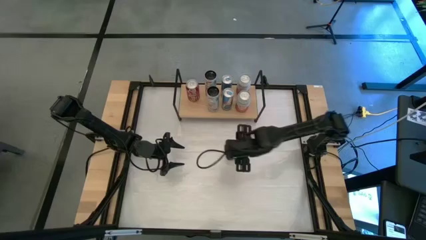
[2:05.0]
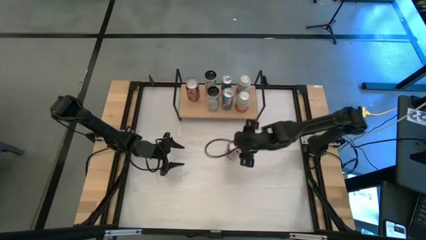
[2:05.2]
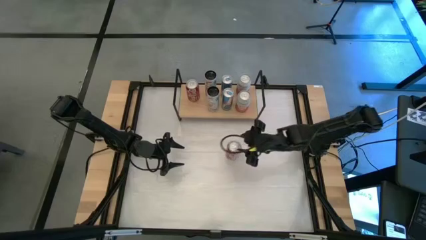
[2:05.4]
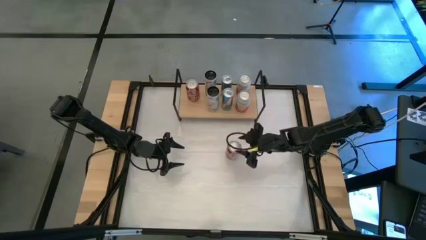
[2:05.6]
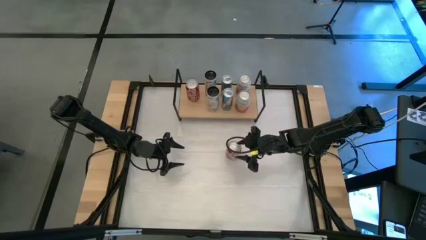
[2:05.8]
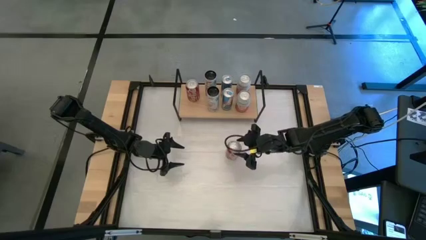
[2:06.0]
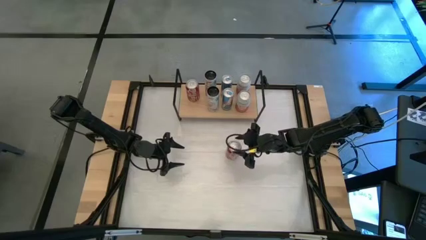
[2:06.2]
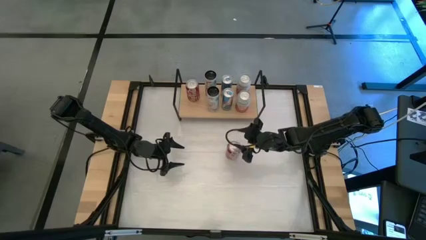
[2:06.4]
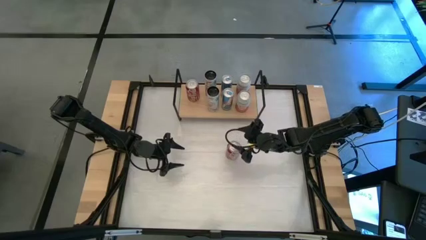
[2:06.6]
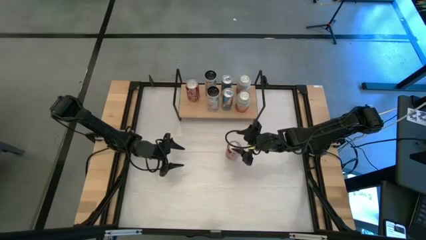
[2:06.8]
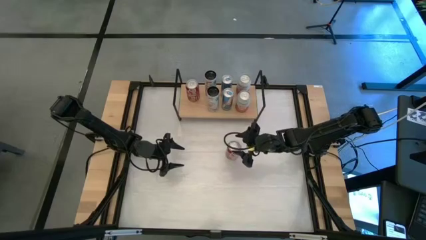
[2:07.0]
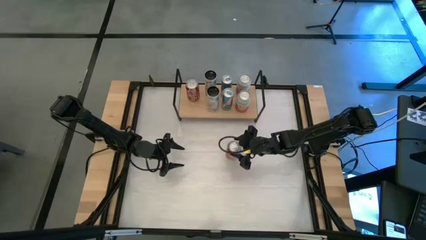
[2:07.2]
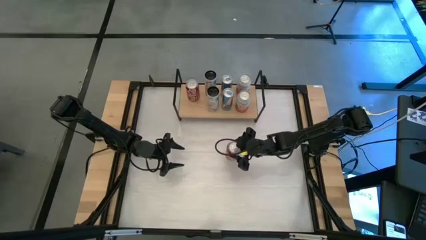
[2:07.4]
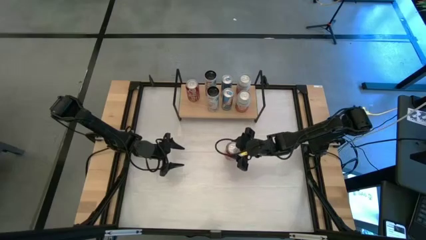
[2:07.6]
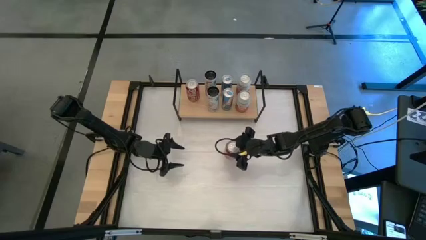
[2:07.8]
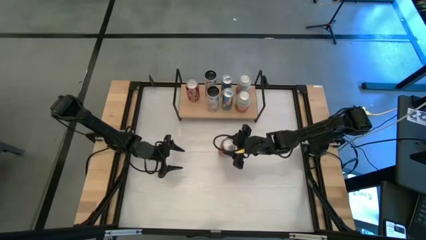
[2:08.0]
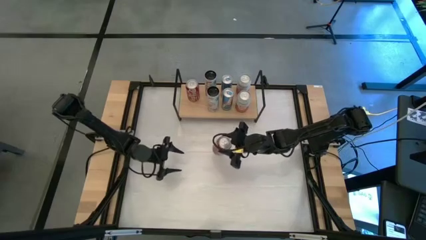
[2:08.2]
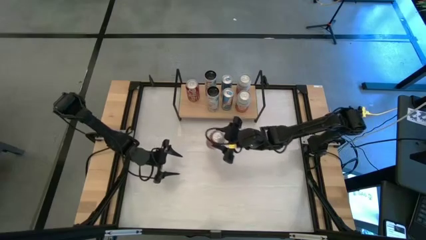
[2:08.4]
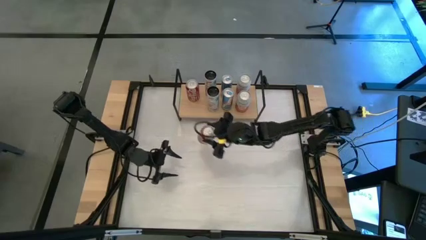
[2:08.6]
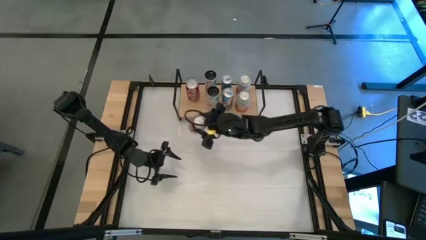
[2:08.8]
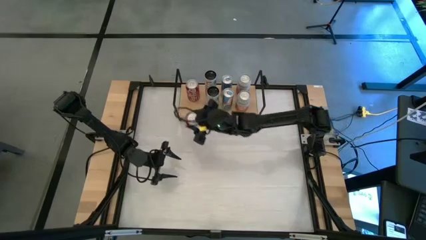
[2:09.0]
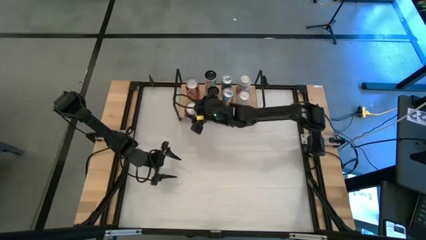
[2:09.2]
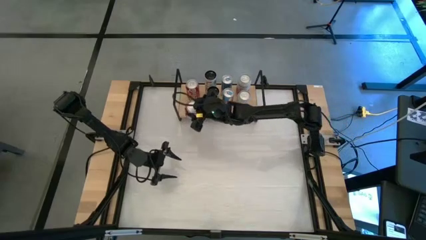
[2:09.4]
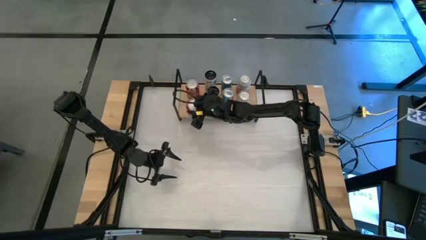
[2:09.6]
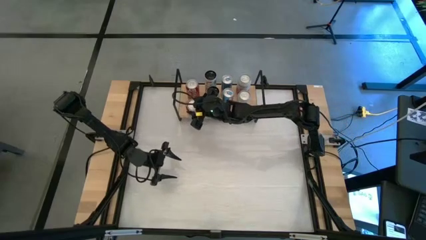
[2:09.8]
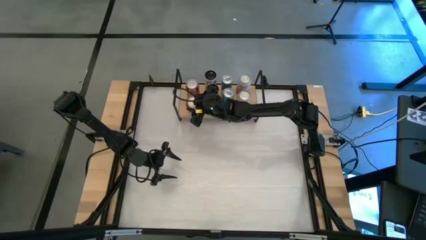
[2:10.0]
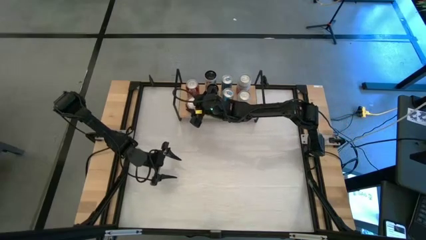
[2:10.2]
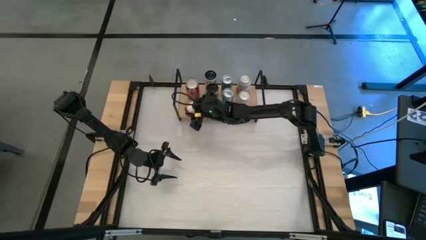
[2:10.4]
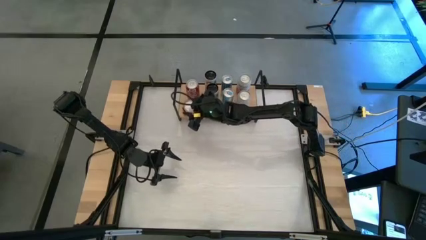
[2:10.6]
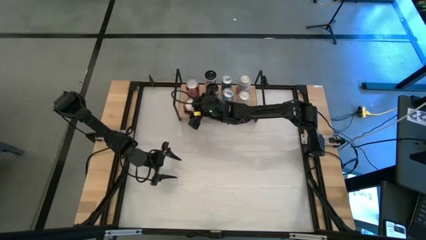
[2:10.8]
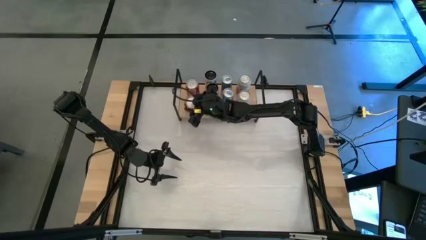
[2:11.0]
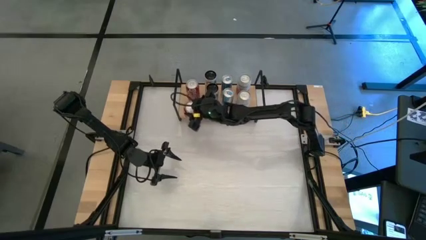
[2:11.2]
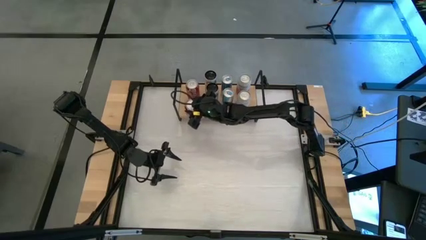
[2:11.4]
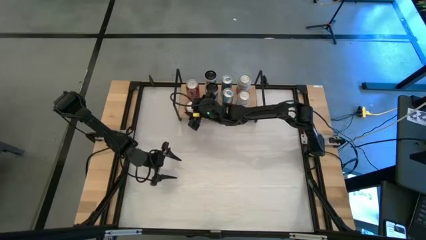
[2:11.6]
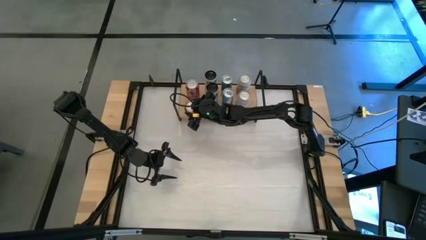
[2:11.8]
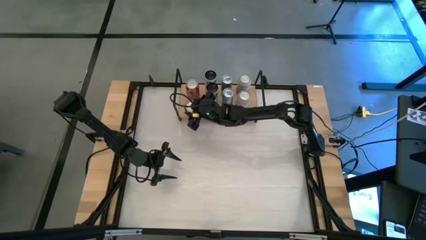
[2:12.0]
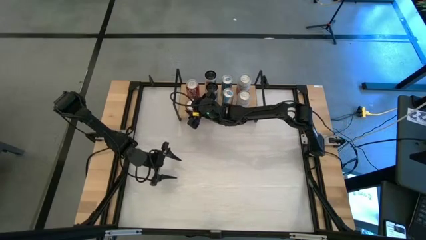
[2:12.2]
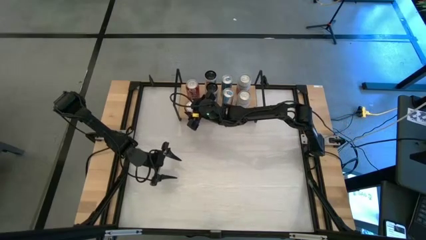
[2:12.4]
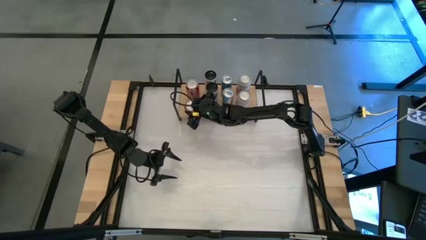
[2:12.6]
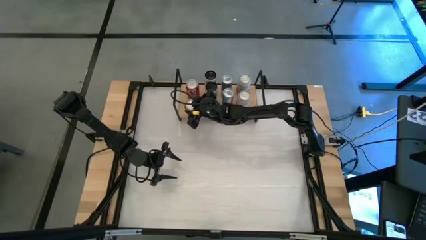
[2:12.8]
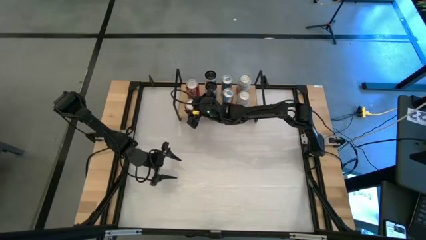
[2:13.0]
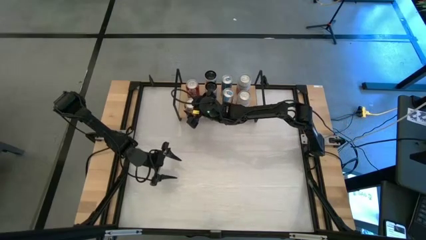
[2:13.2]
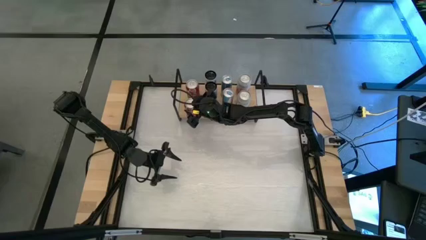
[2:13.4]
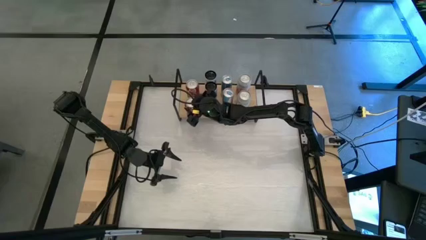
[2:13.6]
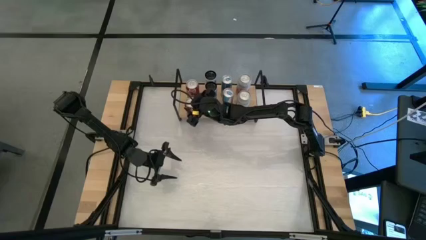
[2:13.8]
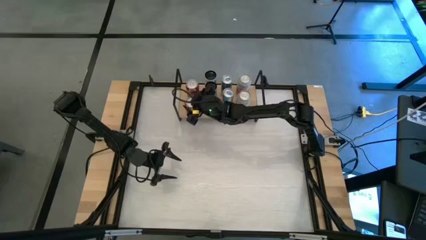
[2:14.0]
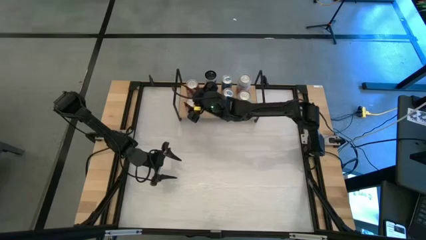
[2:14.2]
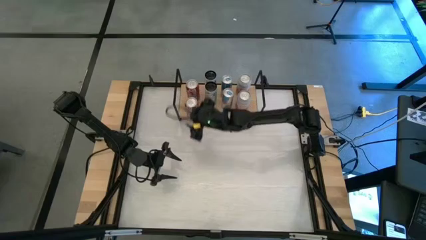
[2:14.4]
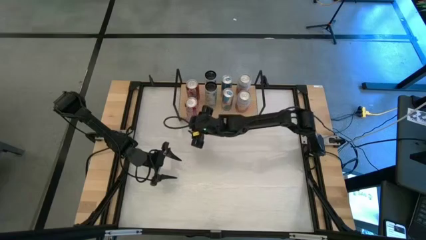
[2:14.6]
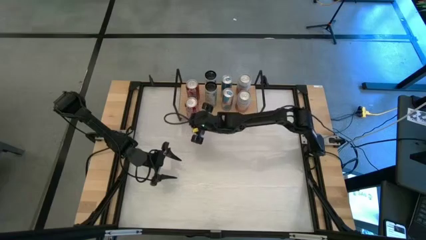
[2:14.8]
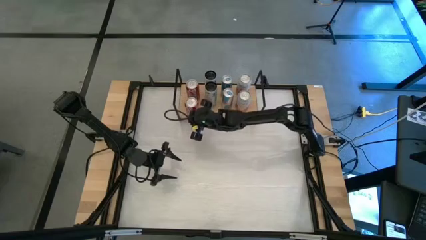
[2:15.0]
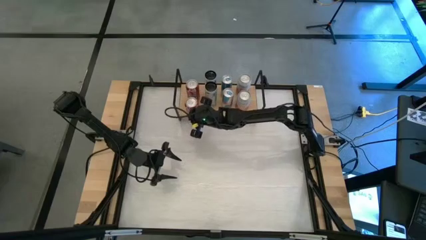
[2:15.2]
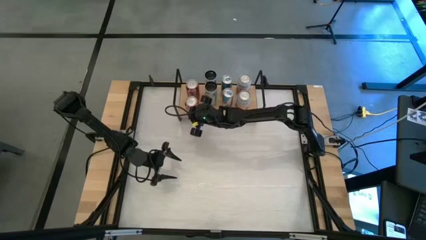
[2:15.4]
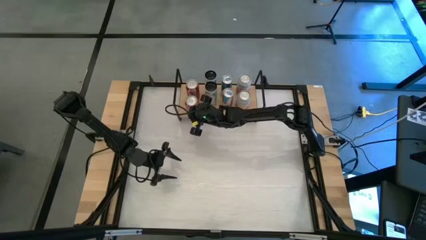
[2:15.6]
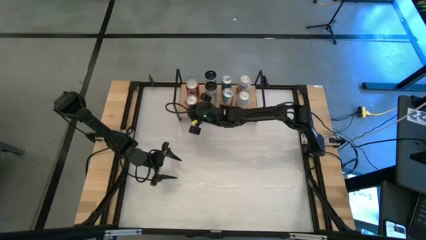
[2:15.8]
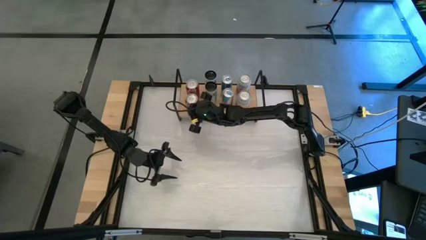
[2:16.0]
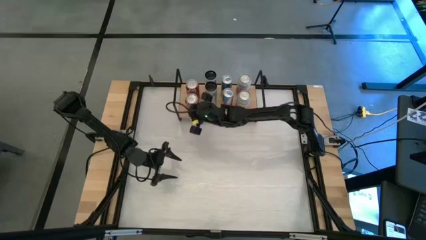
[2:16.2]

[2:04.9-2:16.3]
Task: Place canned beverage on shelf
Put the red soda can on the shelf

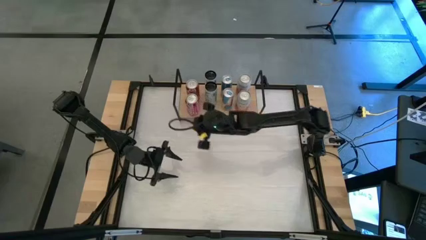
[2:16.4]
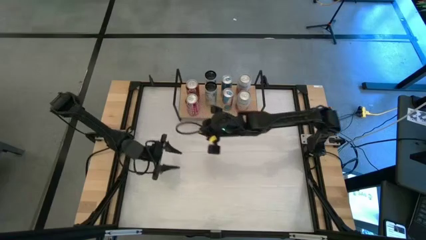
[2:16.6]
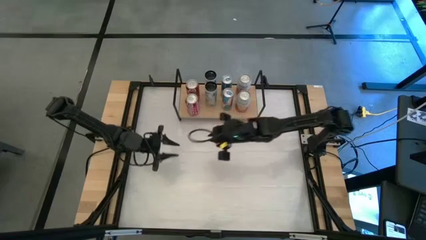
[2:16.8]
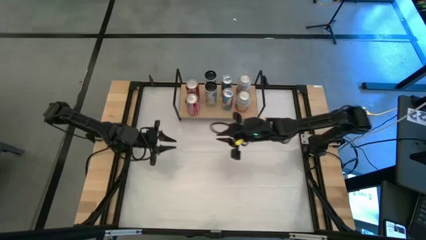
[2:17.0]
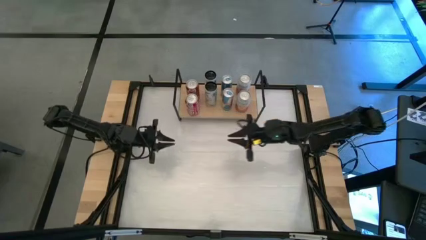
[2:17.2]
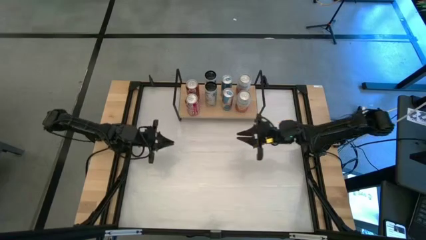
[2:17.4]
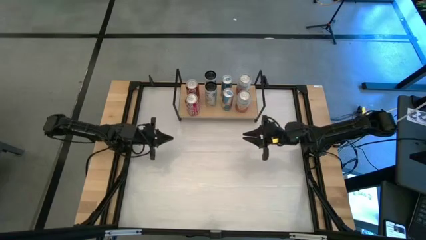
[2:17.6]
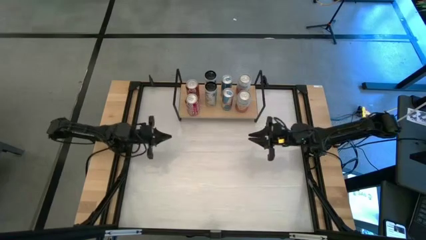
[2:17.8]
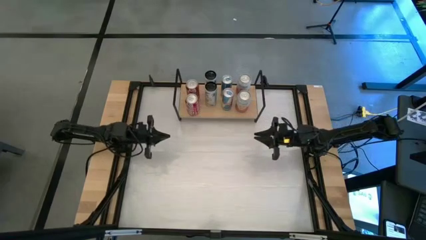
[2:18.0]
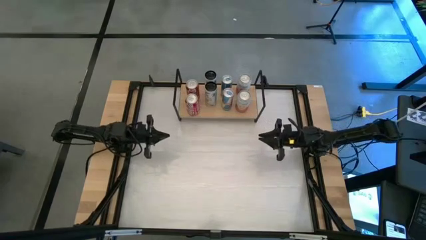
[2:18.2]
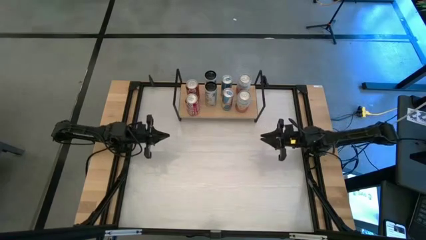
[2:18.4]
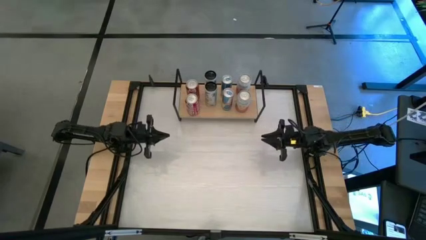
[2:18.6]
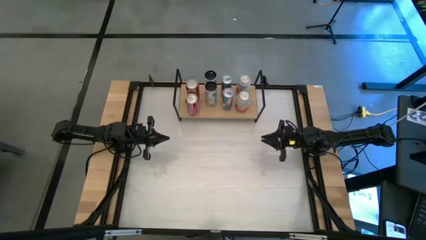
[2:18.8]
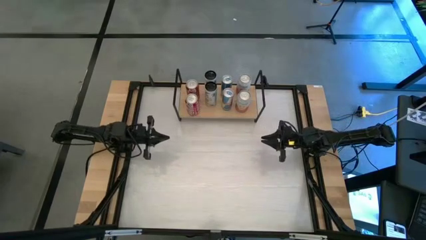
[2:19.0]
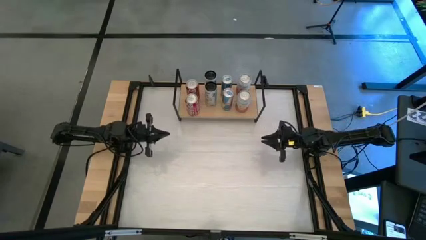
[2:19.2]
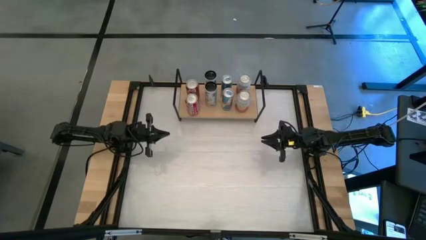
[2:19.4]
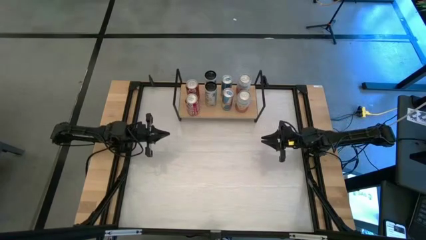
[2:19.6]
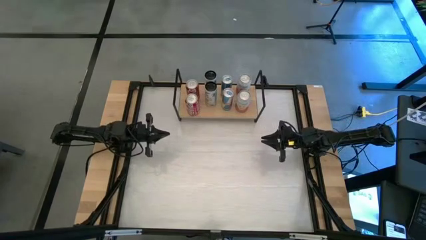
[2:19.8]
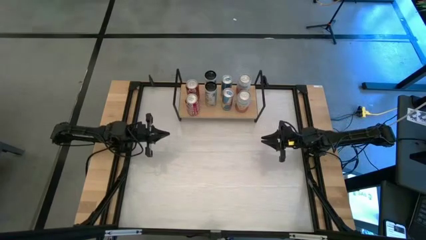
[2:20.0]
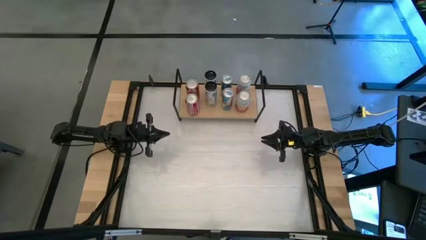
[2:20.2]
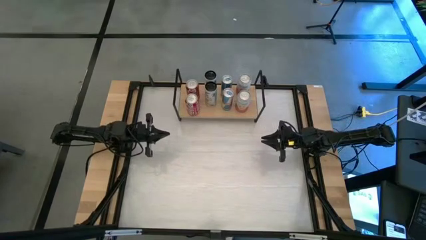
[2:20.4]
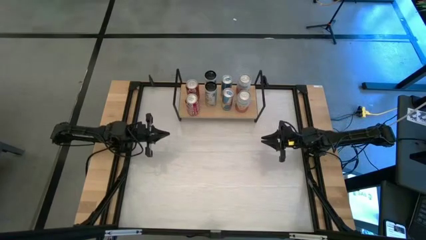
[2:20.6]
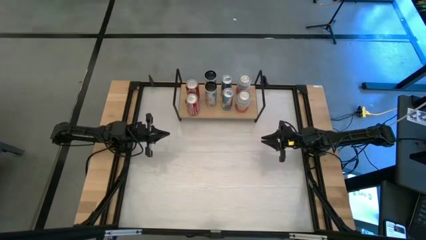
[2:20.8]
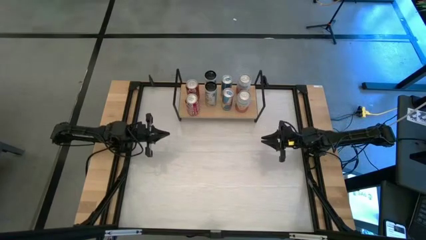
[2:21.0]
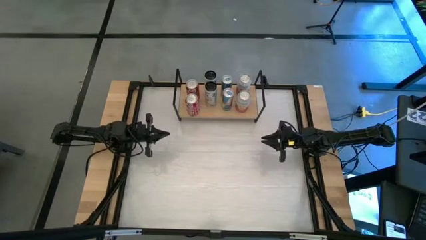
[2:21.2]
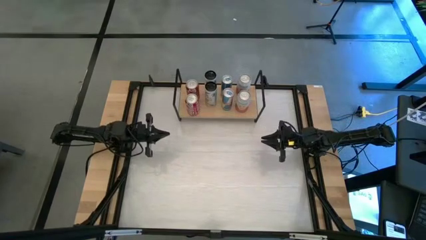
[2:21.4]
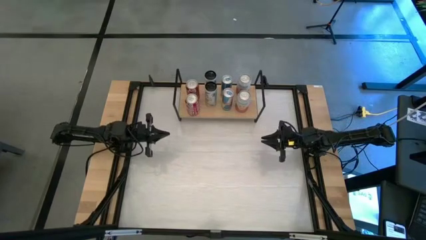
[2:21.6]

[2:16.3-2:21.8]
Return to Home Position
